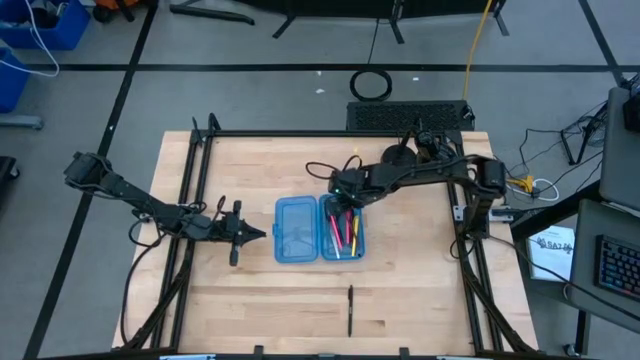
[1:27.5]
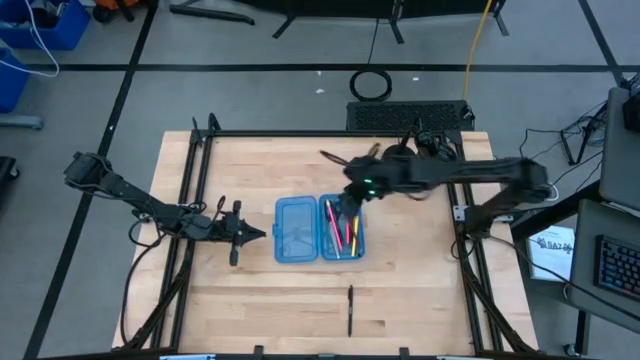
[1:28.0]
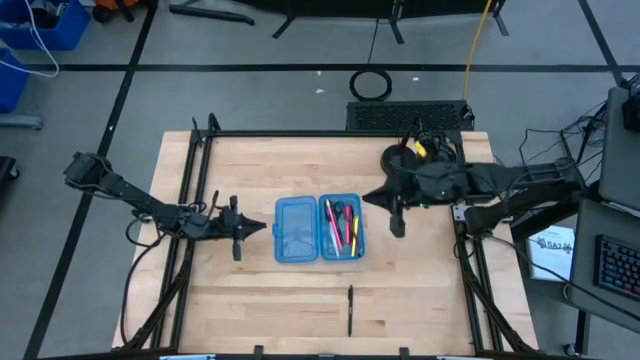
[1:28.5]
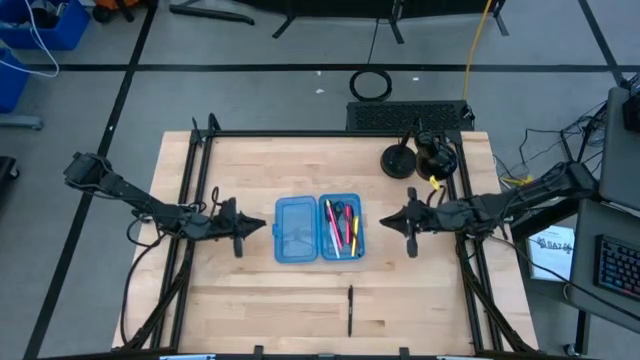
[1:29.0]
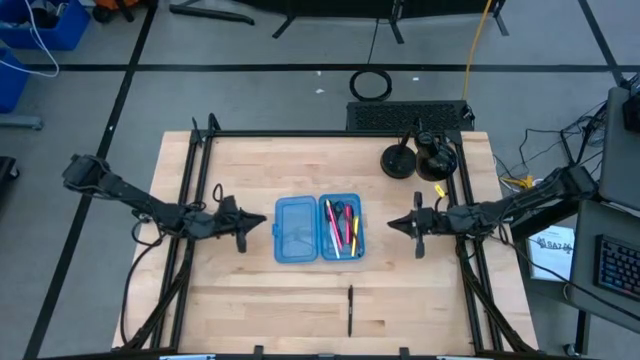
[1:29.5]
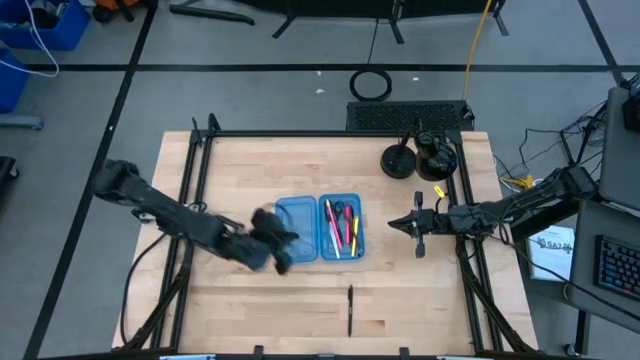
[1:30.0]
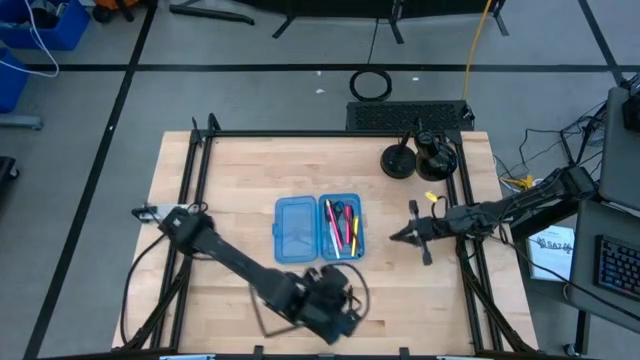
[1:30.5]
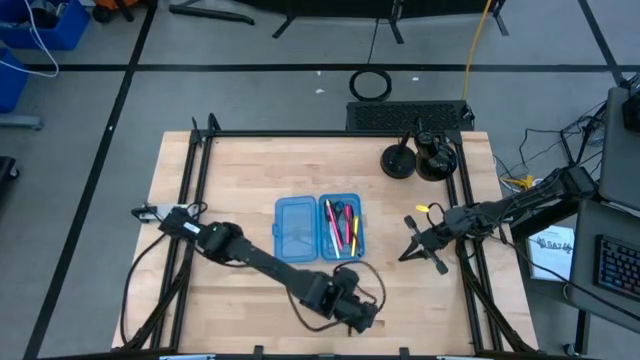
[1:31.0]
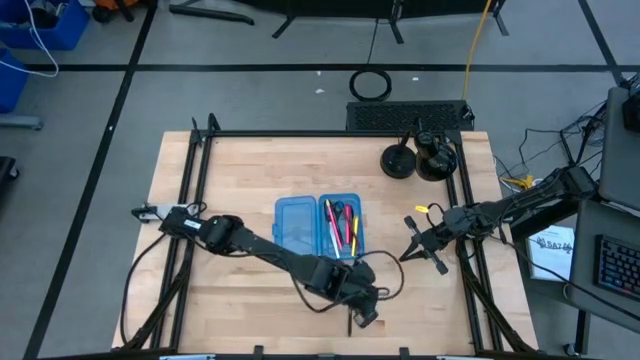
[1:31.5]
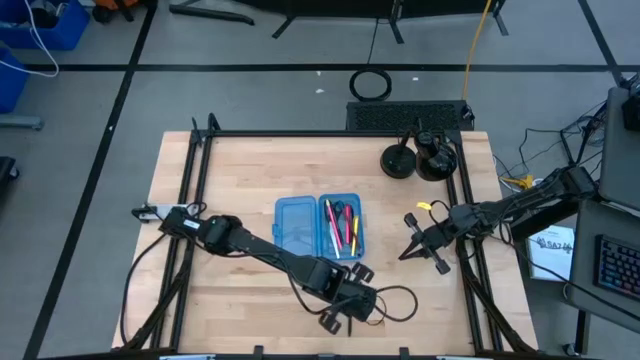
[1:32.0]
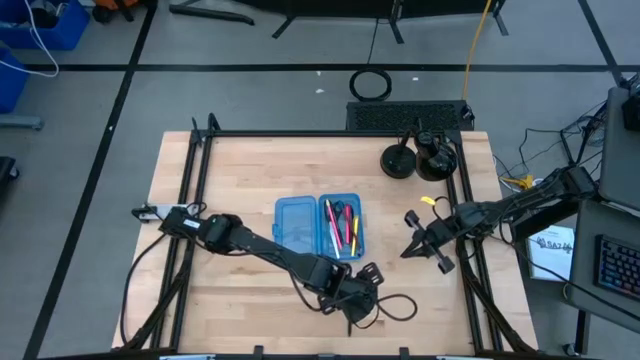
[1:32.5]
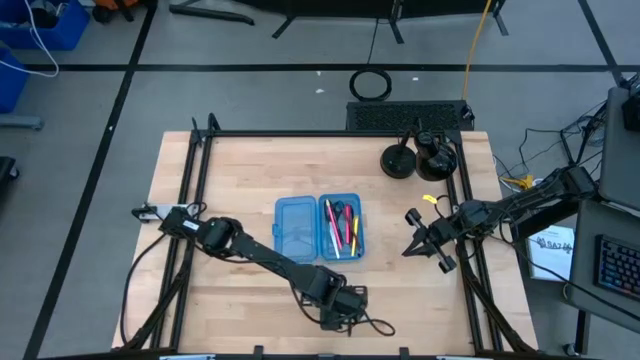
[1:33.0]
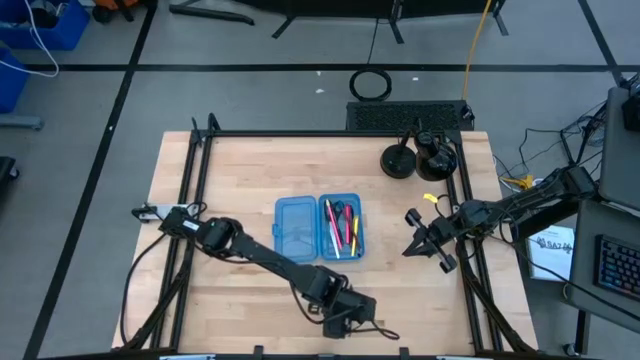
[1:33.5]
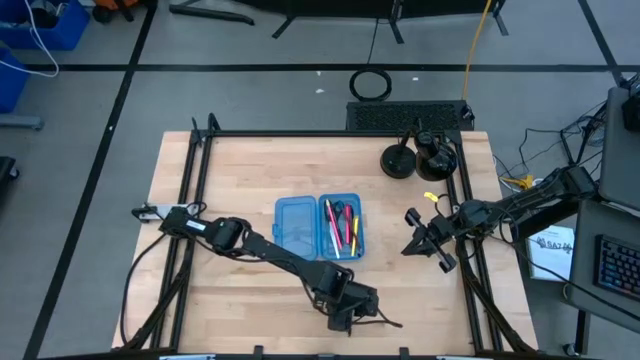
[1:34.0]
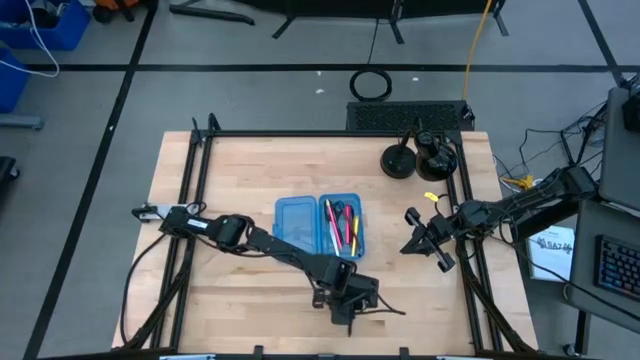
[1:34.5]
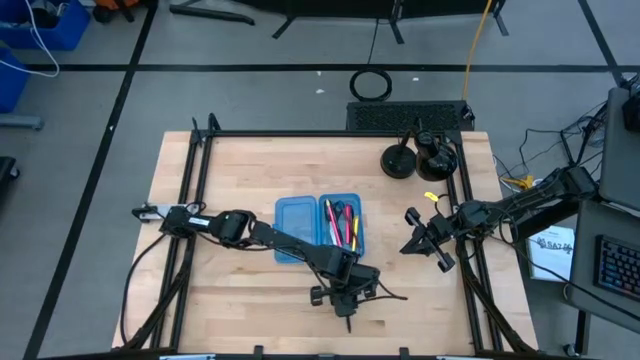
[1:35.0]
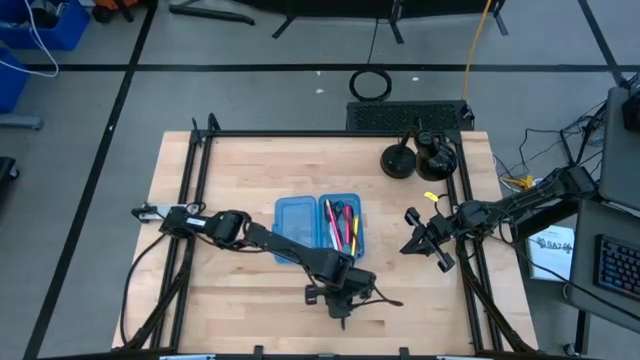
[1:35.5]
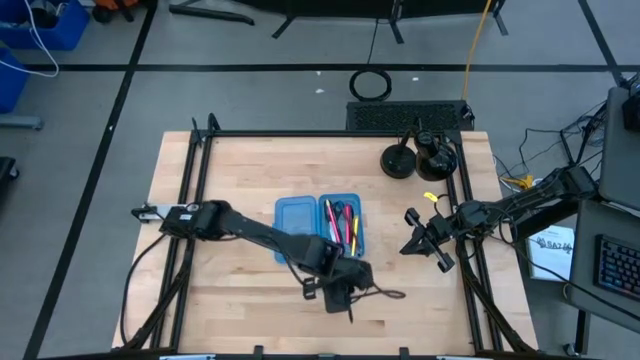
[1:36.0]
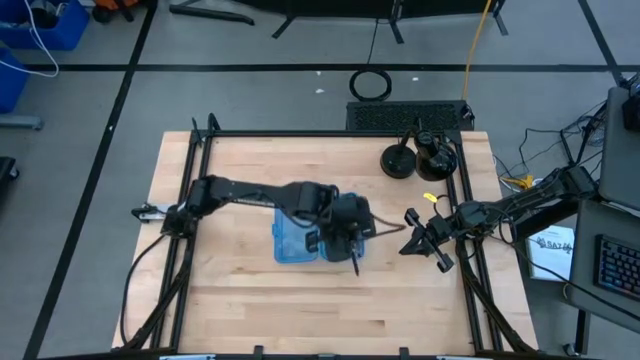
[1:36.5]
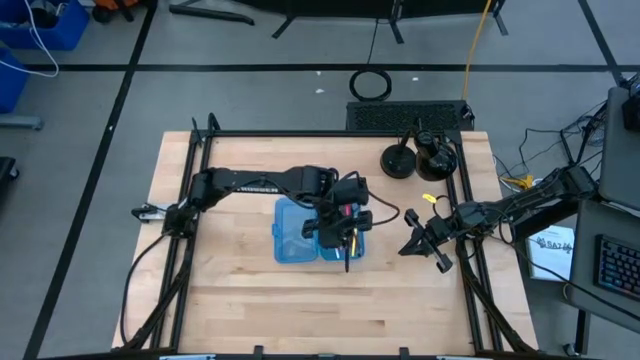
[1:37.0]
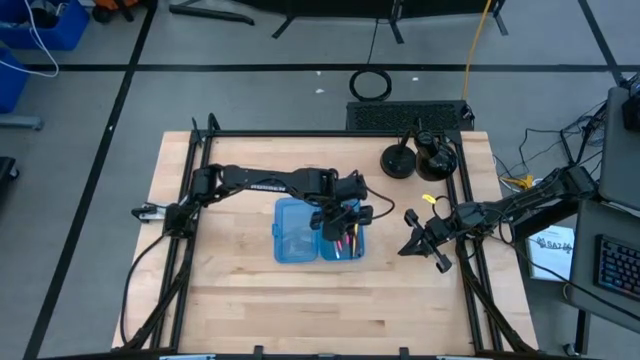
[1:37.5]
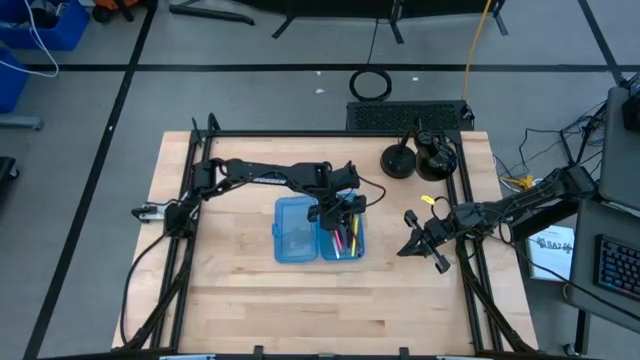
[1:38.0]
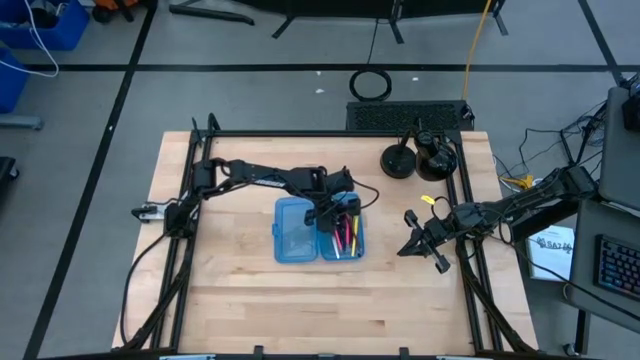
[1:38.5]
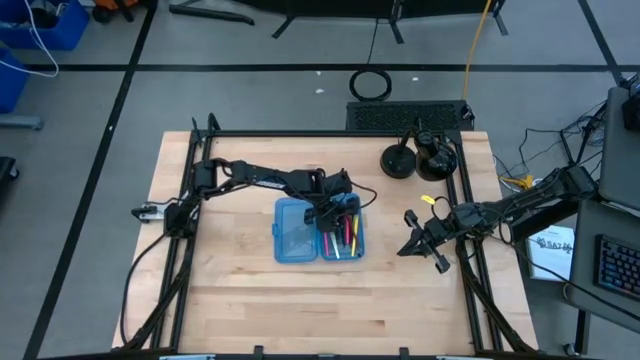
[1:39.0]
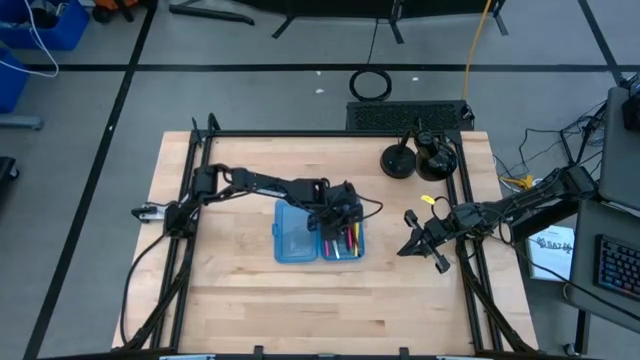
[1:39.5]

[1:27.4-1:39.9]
Task: Pick & place school supplies into a supply box
Put the black pen into the blue supply box

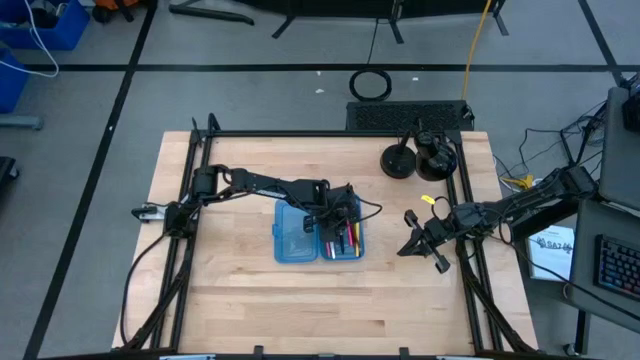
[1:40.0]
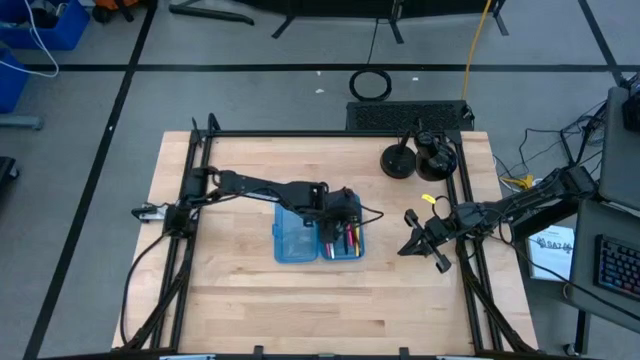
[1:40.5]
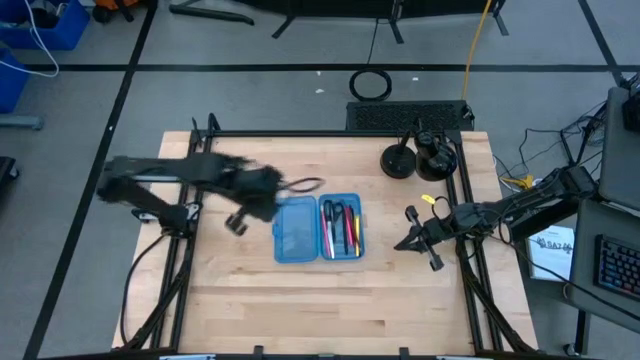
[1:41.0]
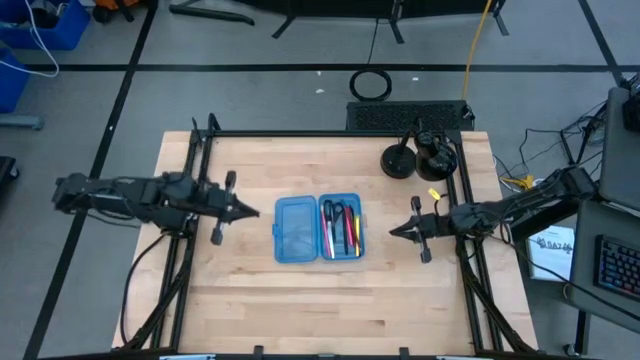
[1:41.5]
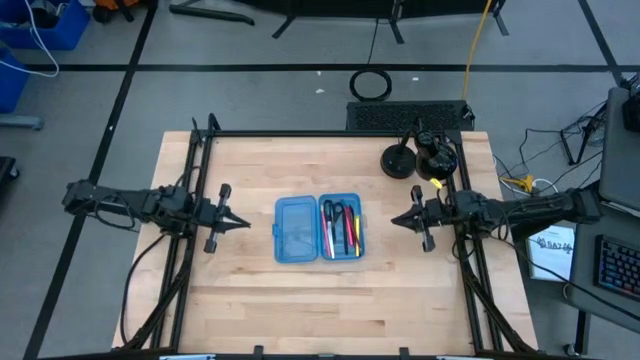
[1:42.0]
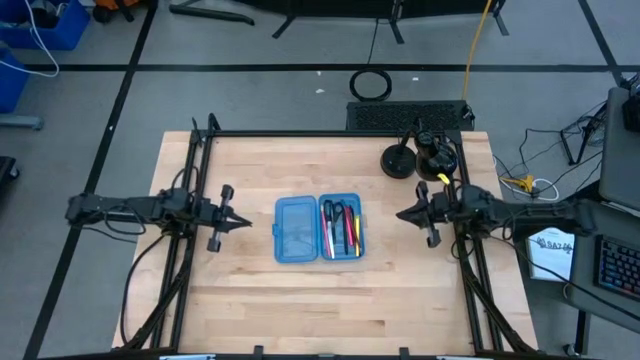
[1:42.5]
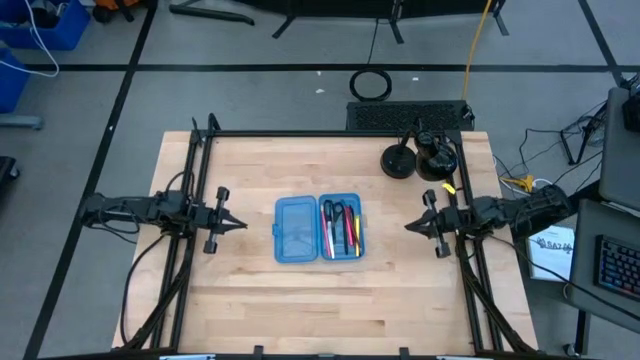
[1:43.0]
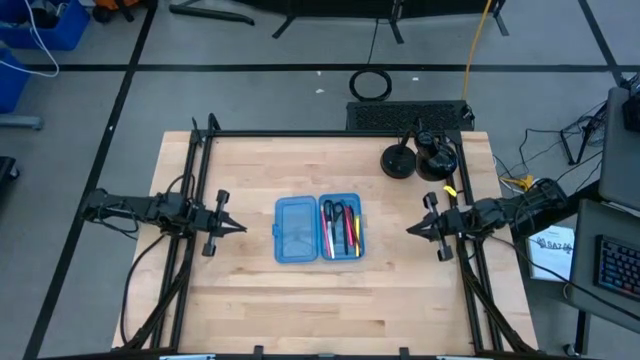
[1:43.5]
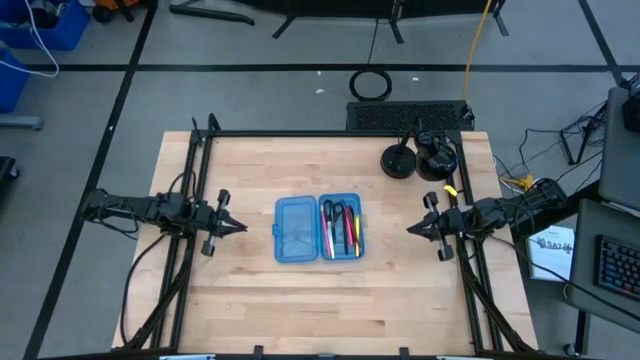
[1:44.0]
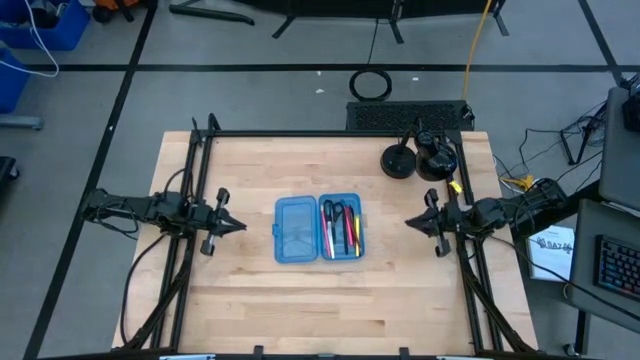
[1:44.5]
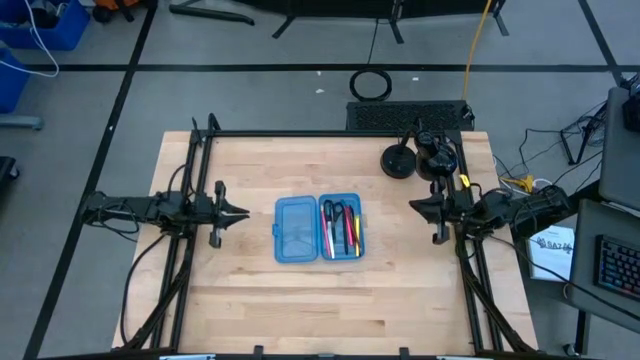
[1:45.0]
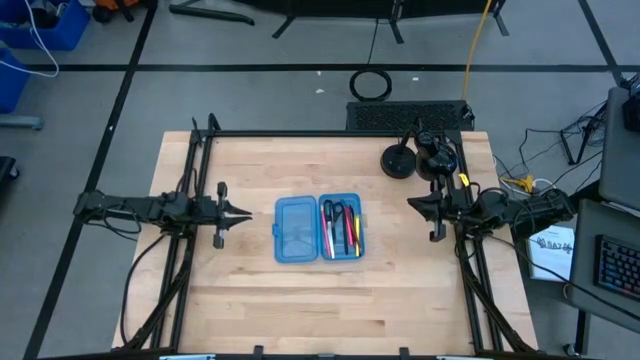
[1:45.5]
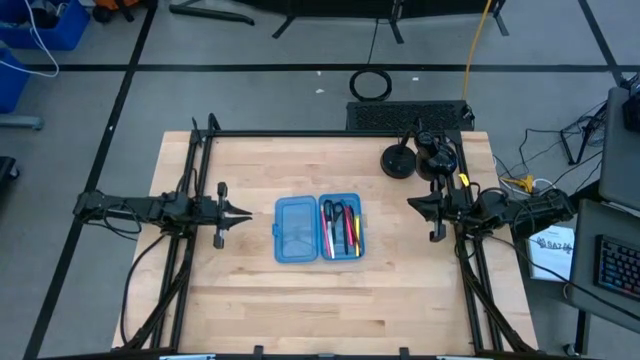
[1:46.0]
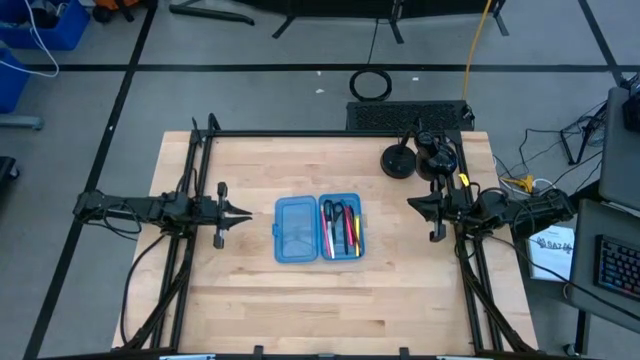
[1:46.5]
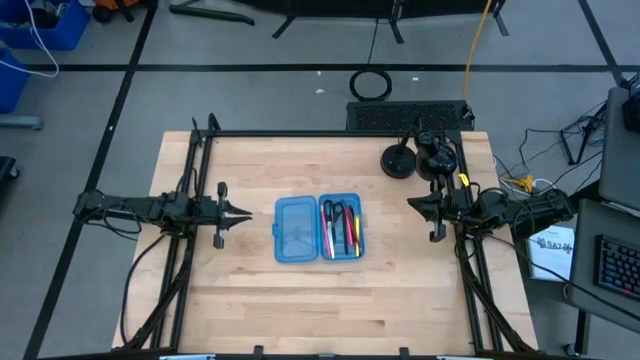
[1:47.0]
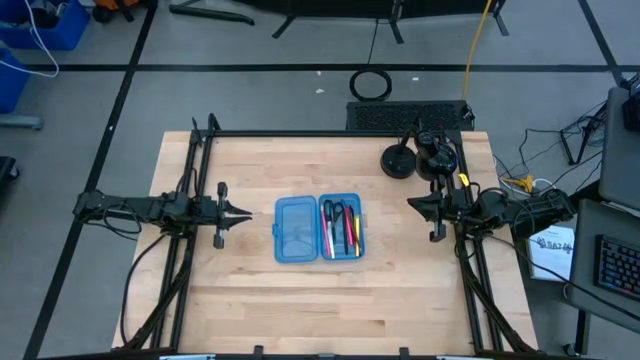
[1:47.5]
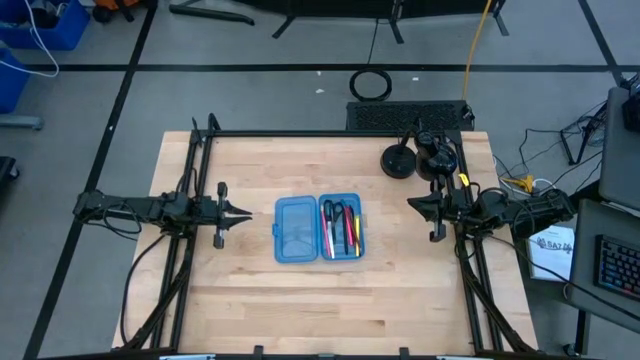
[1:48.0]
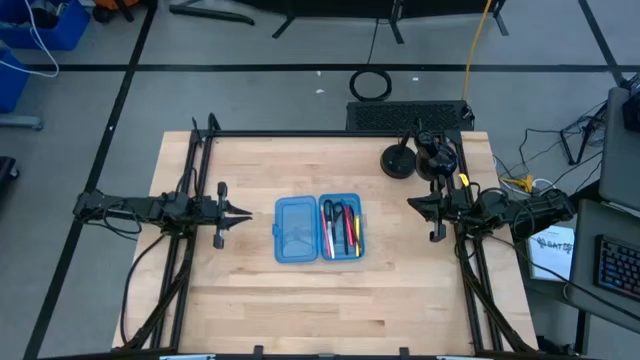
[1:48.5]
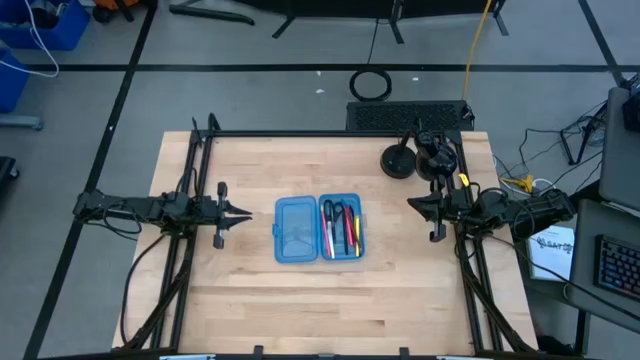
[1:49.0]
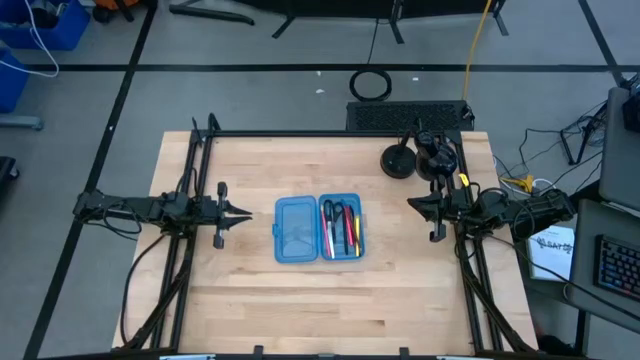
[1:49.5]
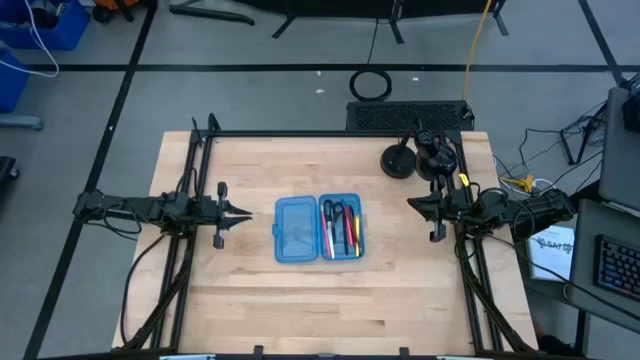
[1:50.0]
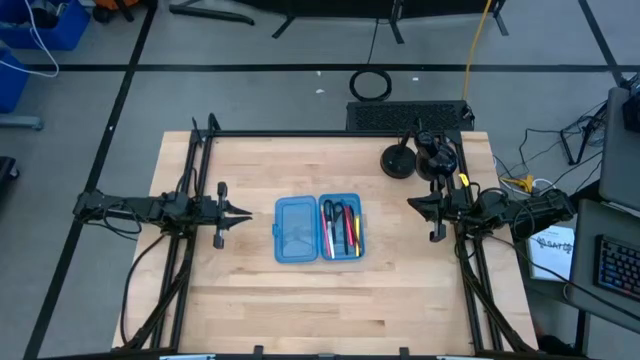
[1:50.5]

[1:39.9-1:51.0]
Return to Home Position
